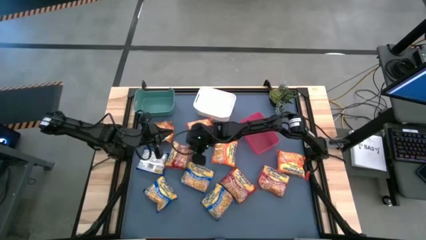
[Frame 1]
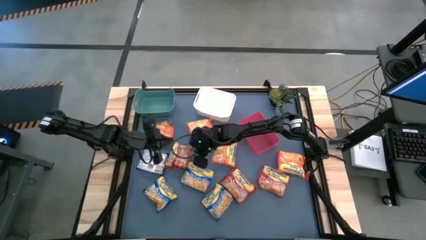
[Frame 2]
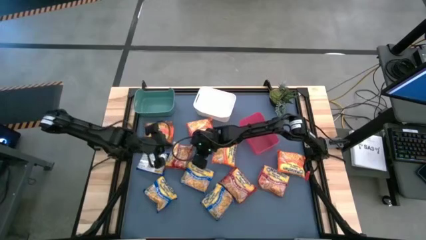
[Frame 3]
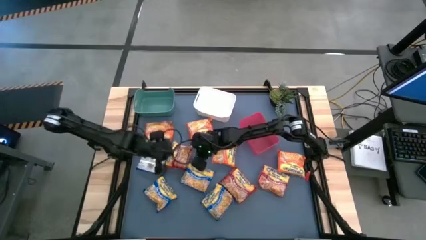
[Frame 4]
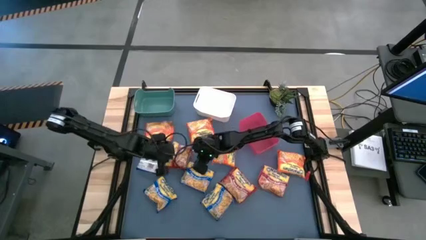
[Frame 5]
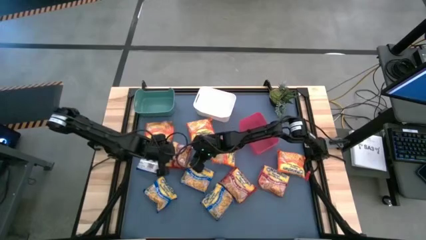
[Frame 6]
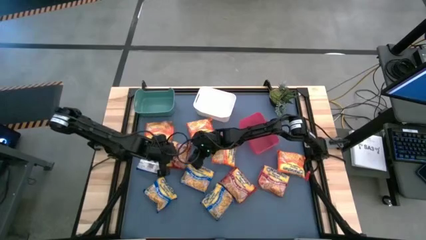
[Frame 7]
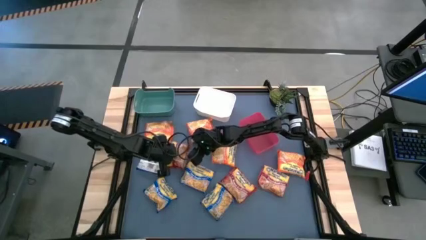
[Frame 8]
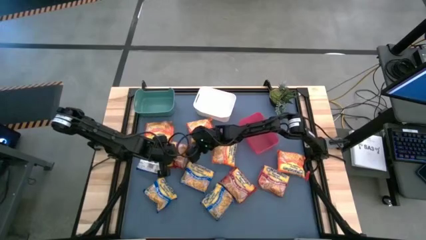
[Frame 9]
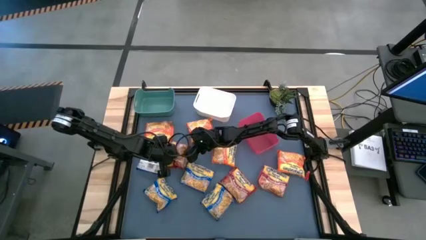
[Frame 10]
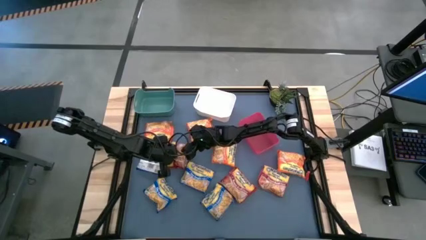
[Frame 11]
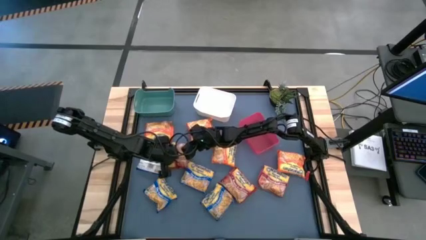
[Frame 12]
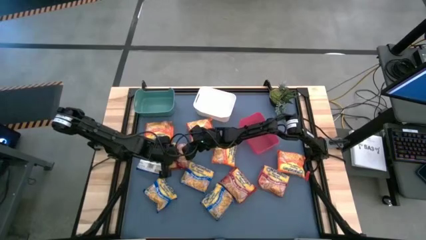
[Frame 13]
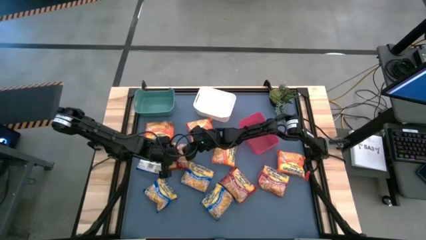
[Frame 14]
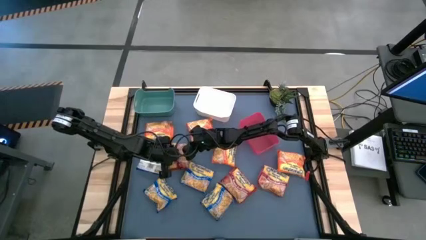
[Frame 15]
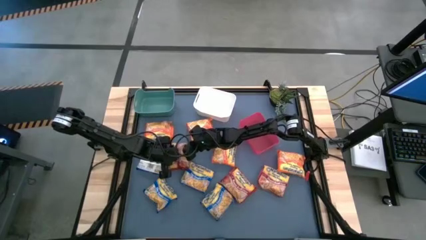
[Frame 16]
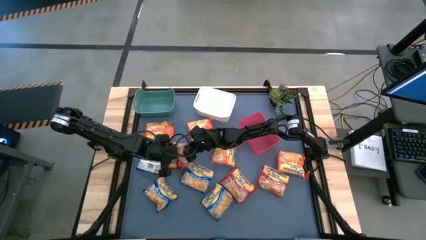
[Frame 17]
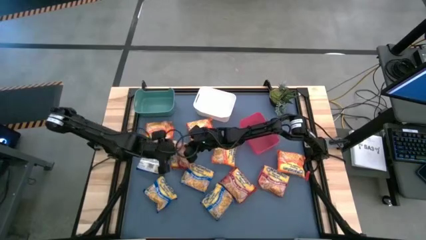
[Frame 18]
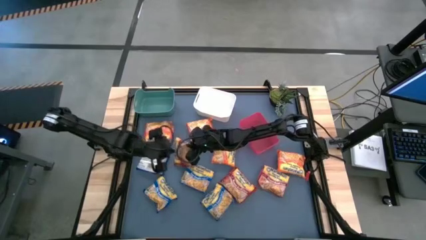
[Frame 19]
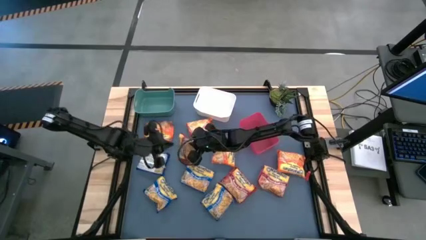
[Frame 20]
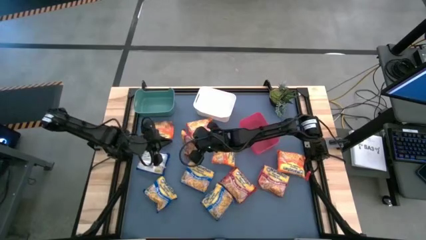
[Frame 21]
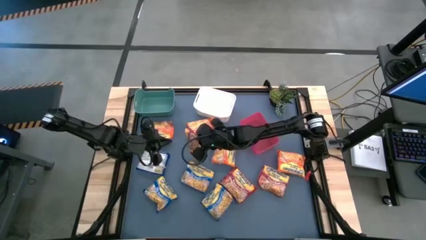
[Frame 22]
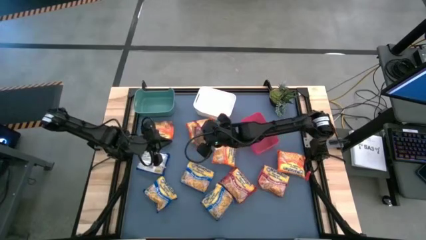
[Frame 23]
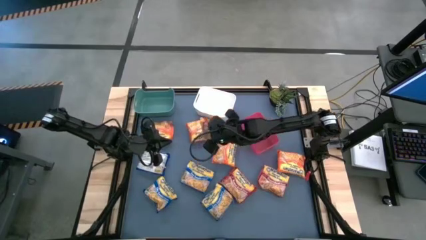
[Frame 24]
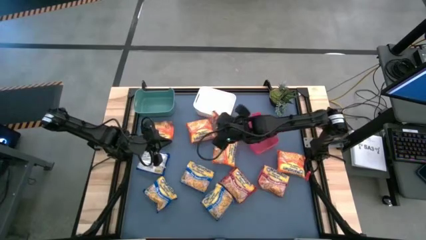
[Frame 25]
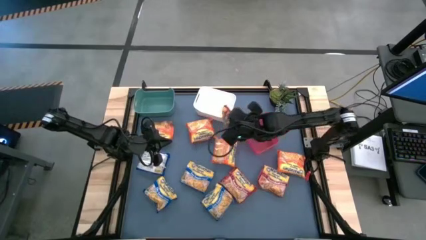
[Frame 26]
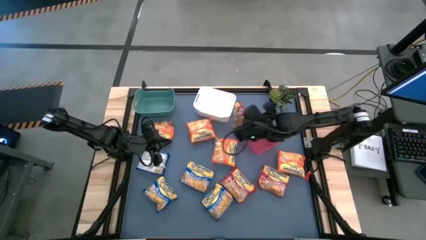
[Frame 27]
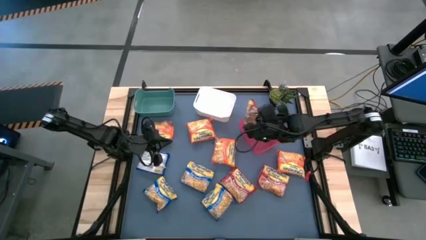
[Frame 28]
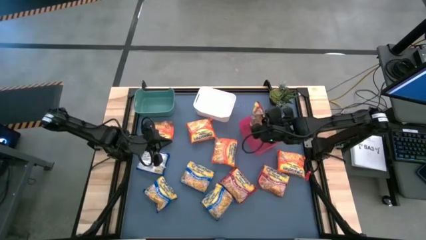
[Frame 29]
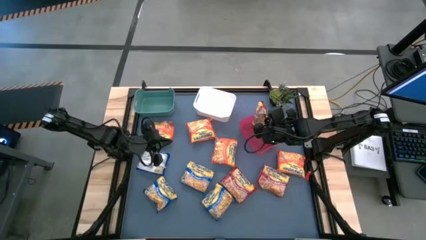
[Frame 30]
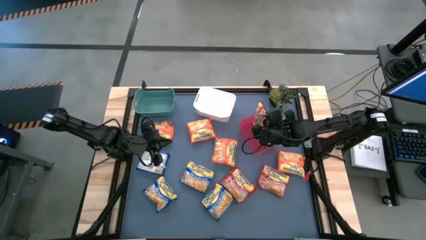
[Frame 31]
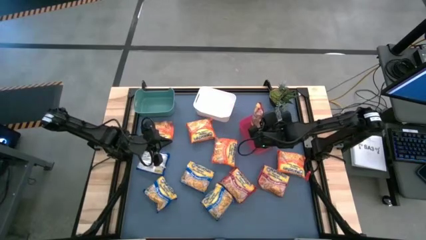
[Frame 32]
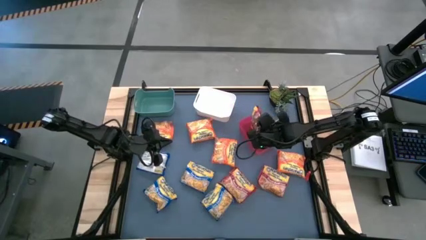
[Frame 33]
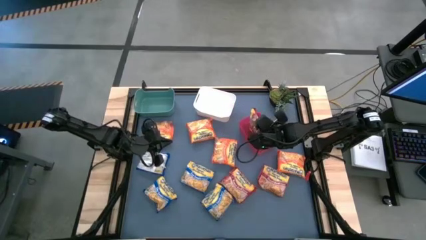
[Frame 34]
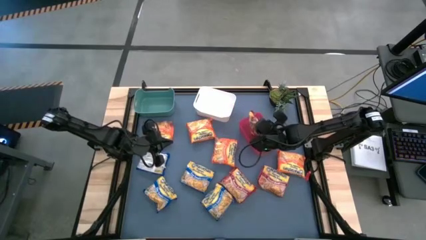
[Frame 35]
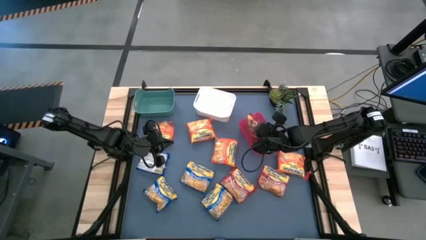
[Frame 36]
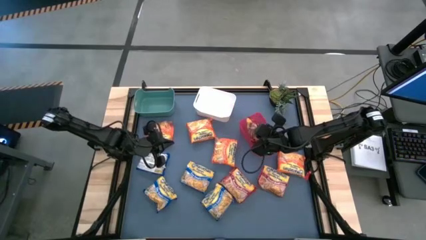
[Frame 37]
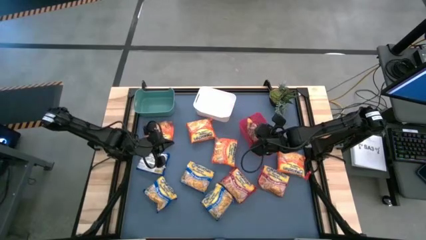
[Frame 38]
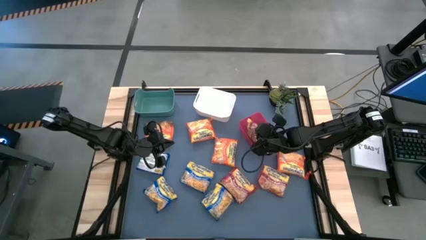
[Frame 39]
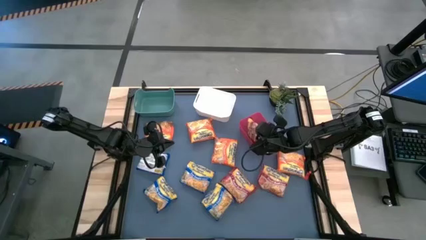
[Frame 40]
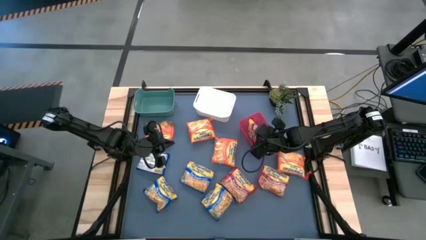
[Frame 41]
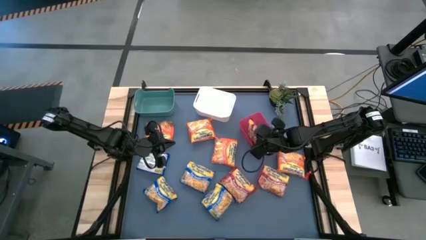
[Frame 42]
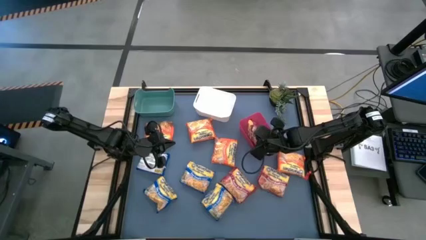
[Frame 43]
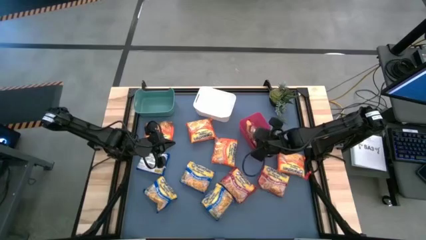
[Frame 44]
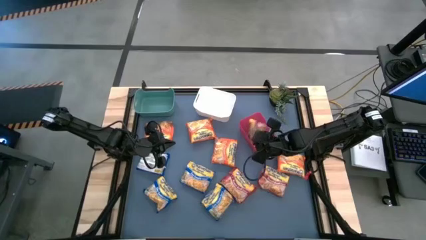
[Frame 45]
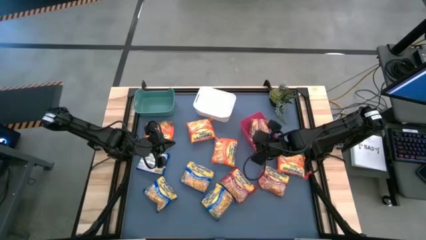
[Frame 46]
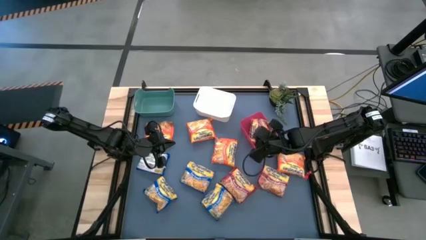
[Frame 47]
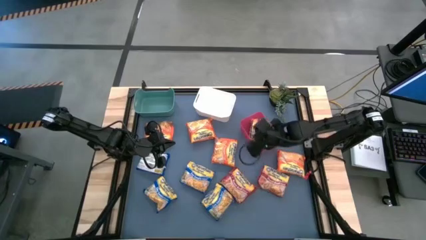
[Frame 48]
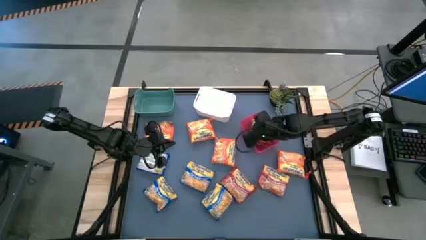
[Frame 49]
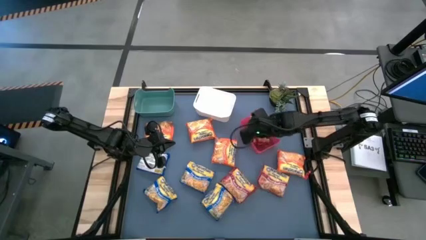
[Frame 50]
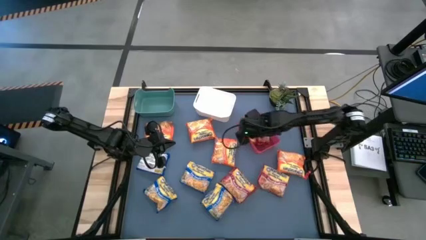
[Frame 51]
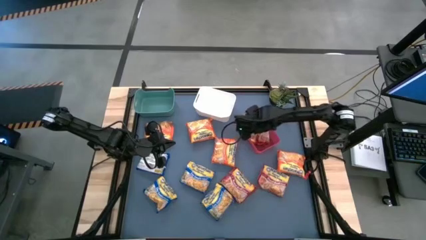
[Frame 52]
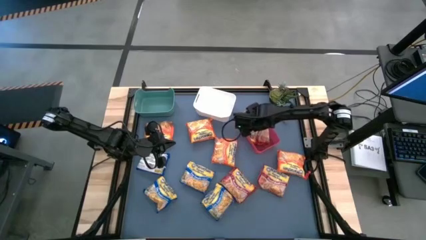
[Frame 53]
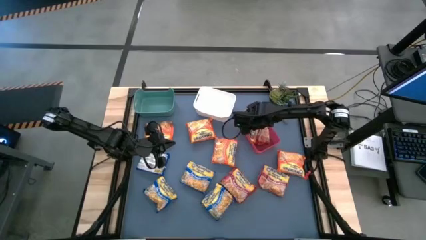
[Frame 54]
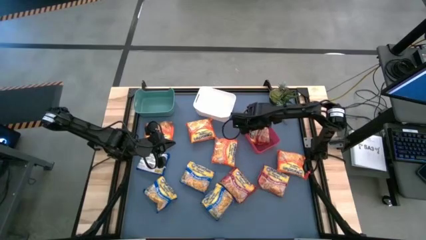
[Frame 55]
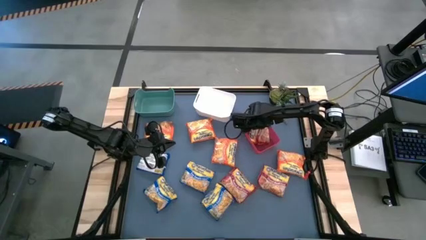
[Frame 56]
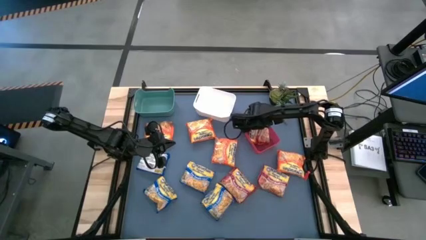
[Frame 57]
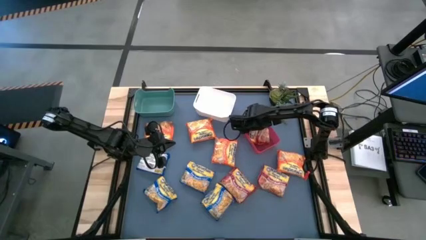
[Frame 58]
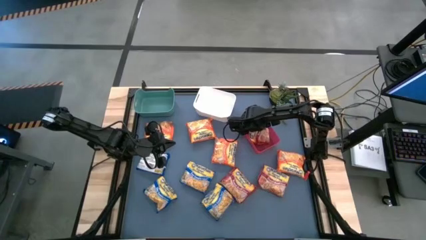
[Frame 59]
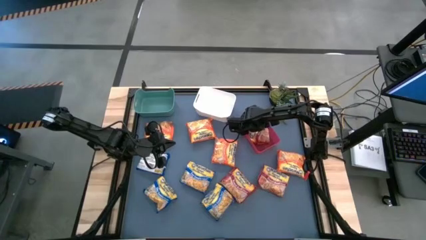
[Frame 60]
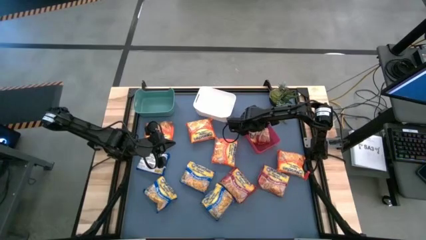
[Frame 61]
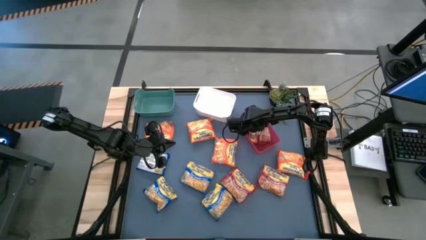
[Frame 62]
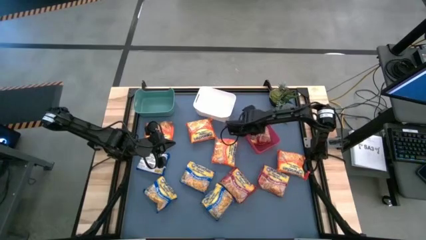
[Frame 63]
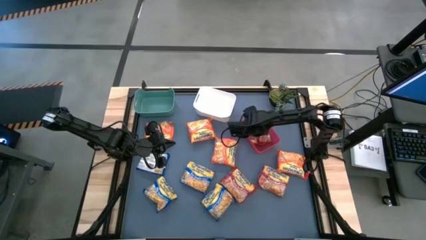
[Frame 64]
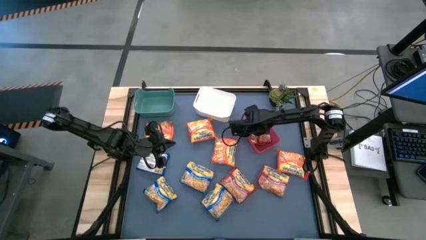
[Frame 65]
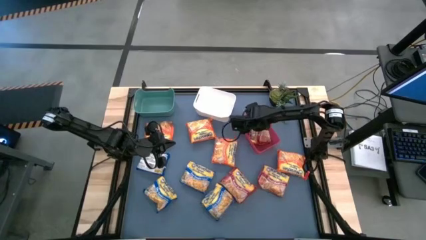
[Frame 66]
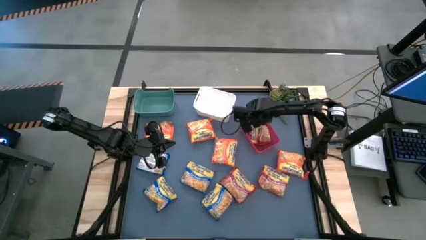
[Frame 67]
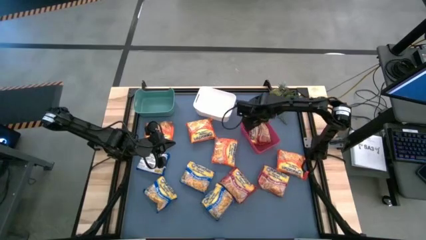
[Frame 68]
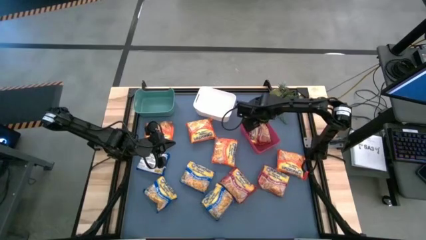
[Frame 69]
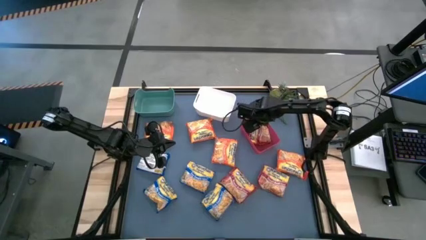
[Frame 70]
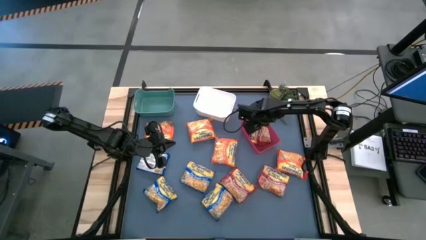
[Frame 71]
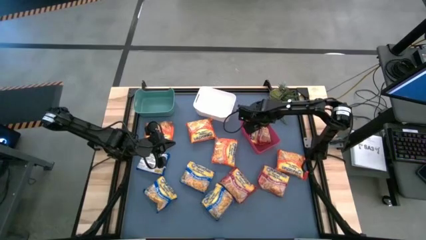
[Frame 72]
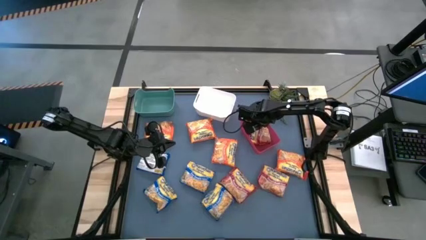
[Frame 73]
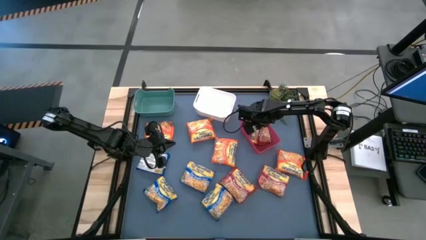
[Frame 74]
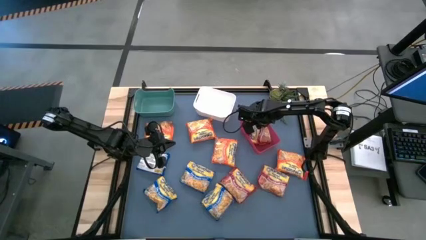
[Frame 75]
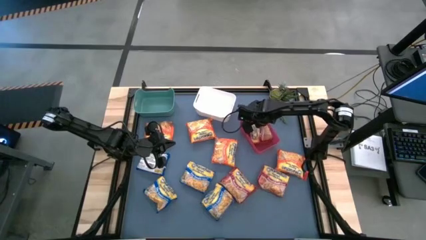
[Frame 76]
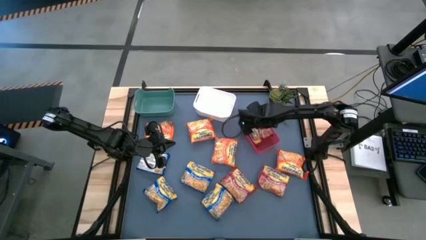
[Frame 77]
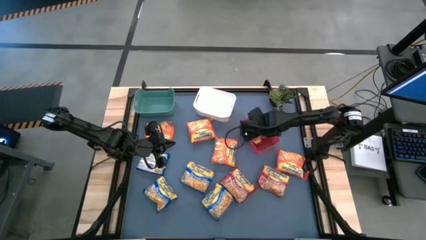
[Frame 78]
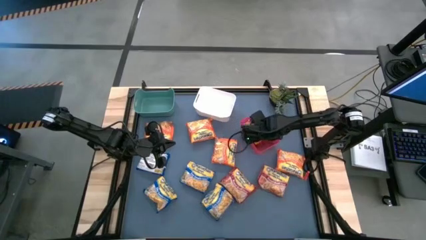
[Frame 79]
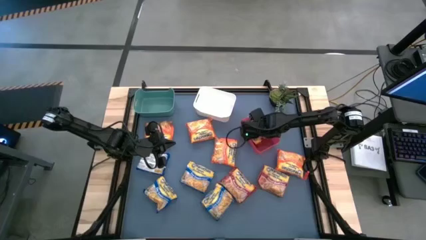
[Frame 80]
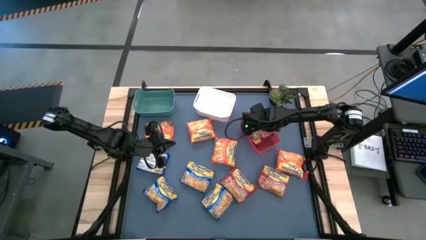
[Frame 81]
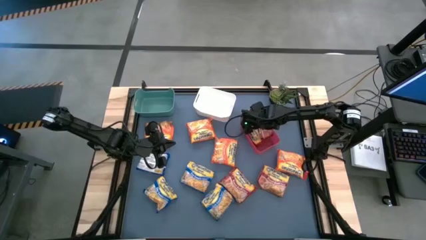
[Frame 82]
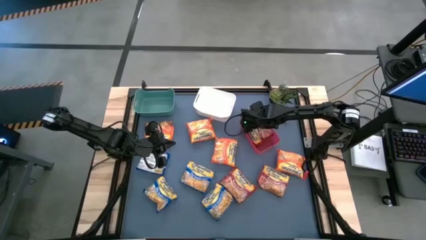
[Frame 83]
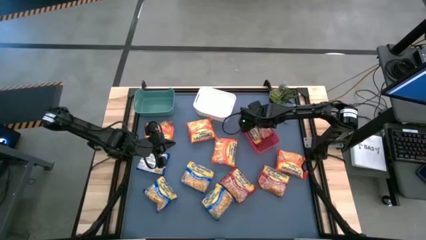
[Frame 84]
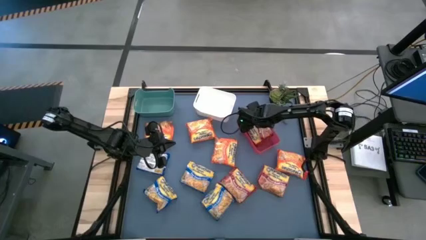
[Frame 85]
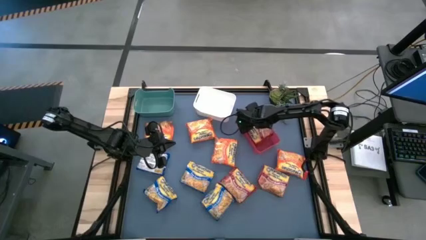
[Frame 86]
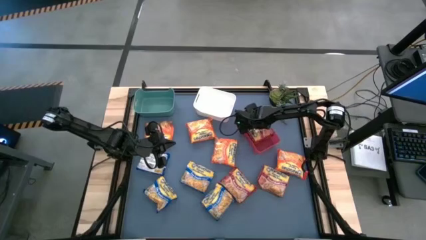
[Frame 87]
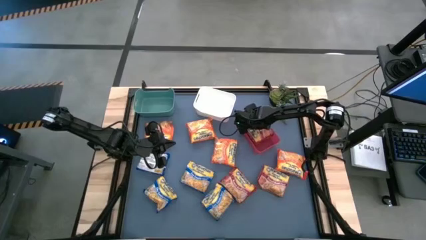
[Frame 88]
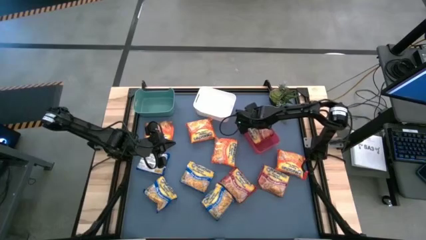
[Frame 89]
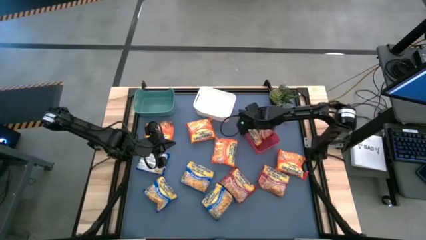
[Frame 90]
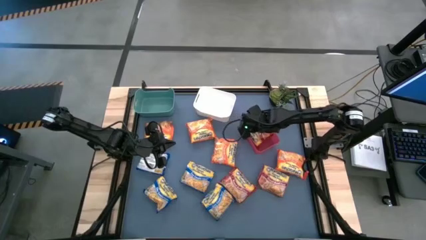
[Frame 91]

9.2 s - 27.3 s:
Task: Sort Maruchan noodles
Put the red noodle pack into the pink bin
